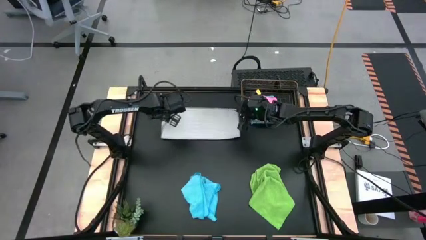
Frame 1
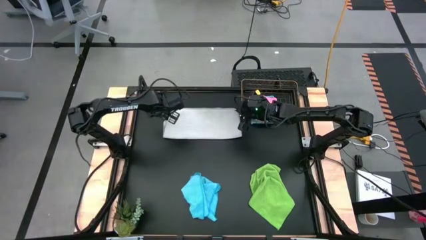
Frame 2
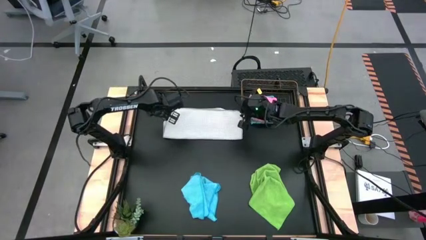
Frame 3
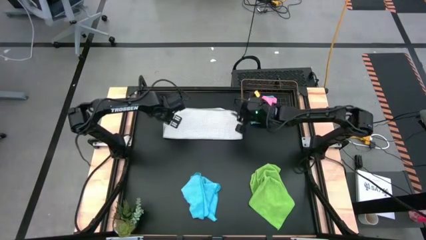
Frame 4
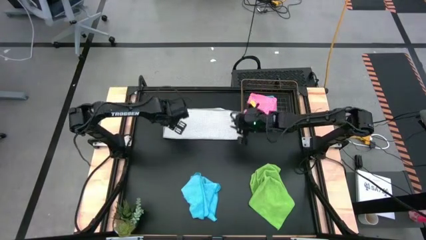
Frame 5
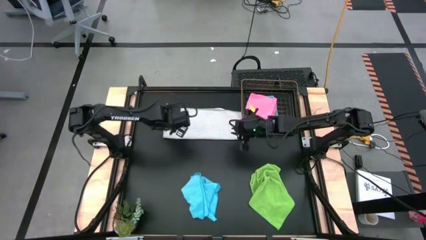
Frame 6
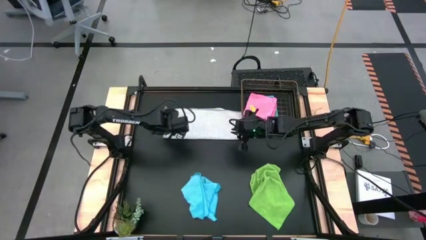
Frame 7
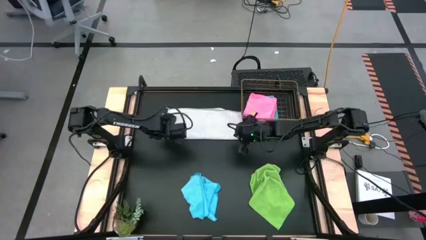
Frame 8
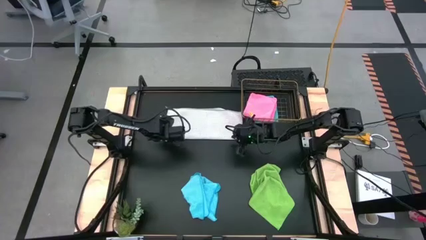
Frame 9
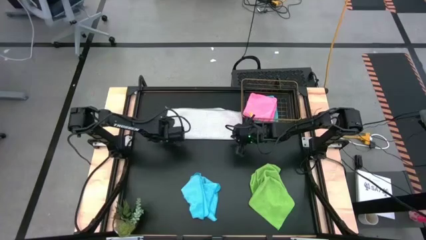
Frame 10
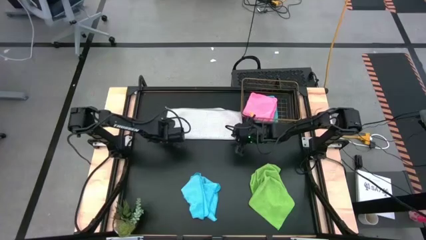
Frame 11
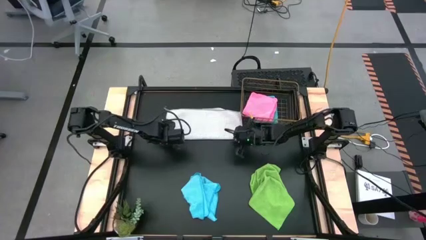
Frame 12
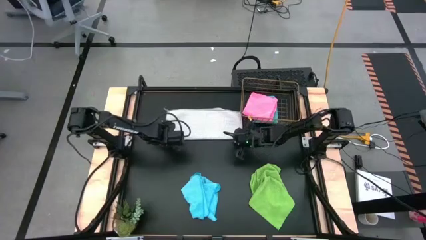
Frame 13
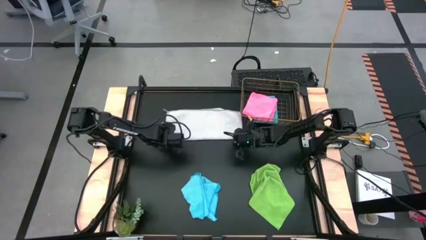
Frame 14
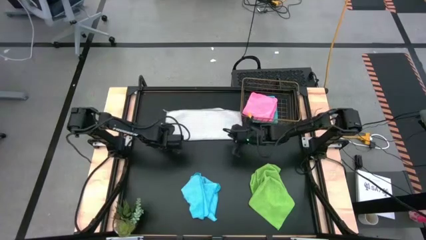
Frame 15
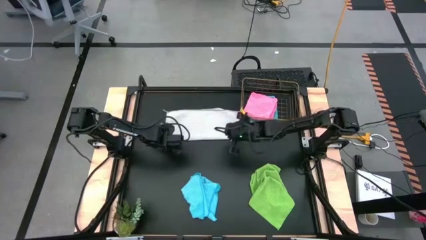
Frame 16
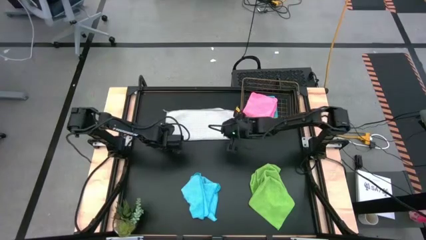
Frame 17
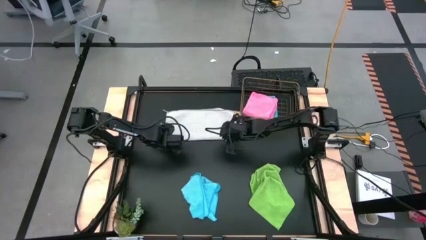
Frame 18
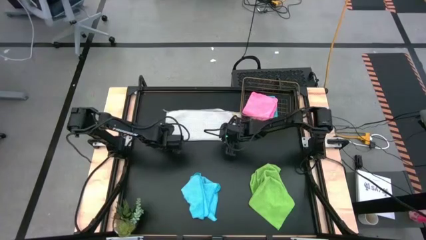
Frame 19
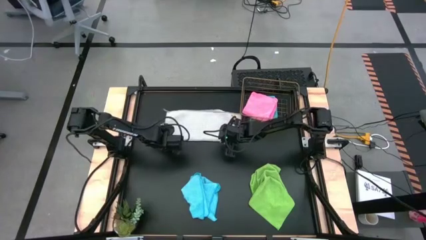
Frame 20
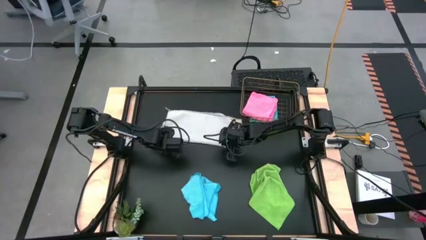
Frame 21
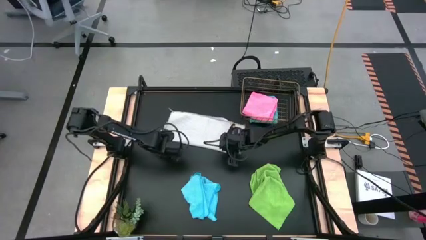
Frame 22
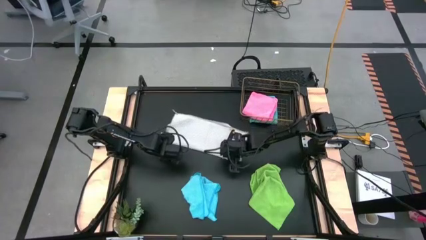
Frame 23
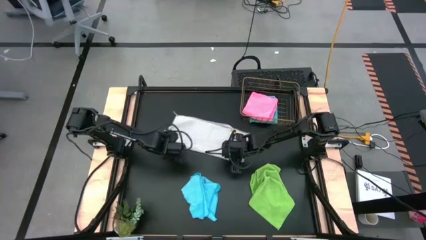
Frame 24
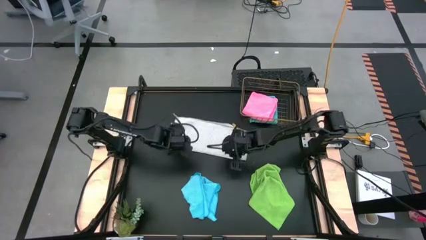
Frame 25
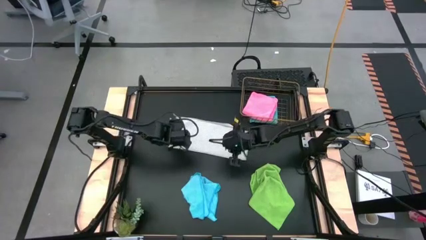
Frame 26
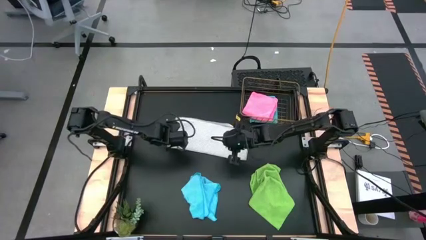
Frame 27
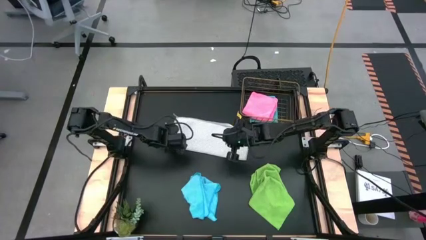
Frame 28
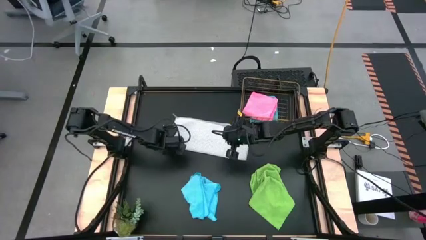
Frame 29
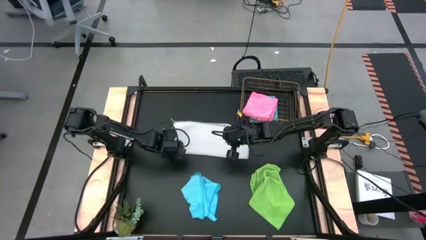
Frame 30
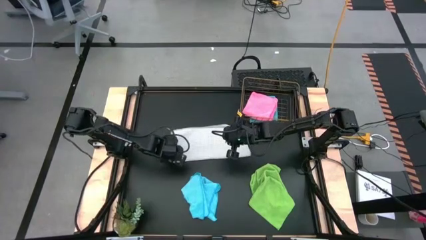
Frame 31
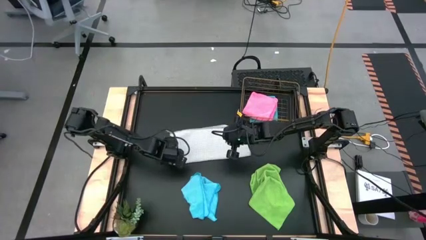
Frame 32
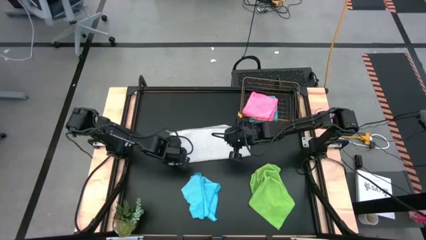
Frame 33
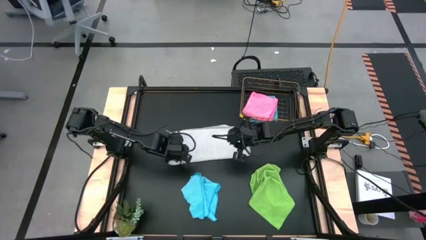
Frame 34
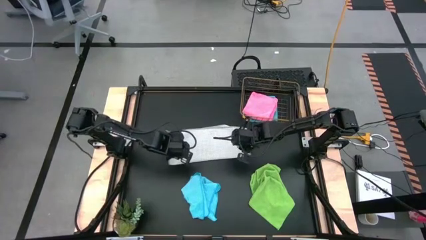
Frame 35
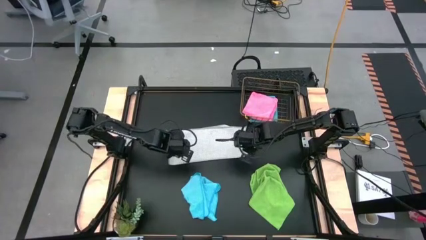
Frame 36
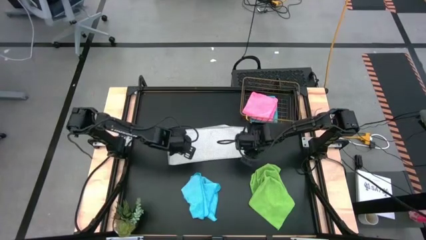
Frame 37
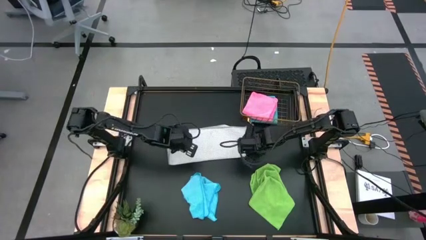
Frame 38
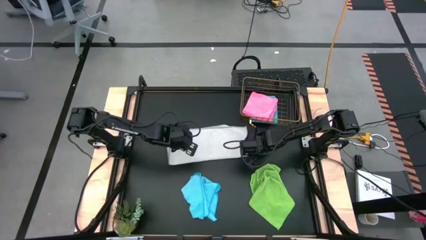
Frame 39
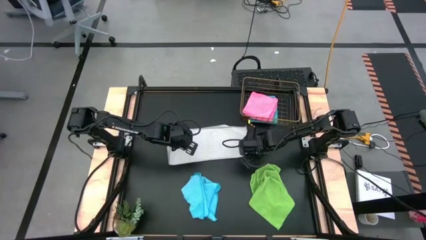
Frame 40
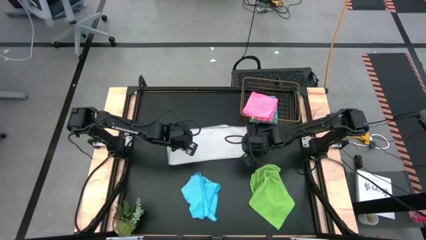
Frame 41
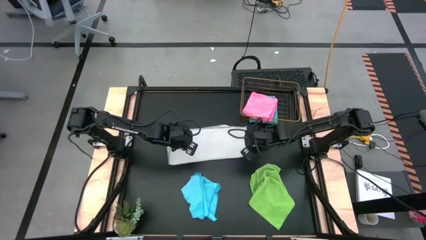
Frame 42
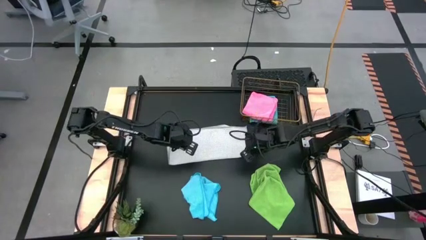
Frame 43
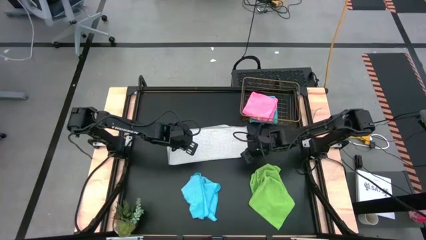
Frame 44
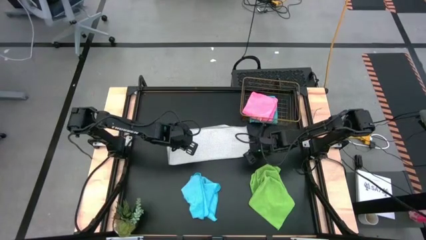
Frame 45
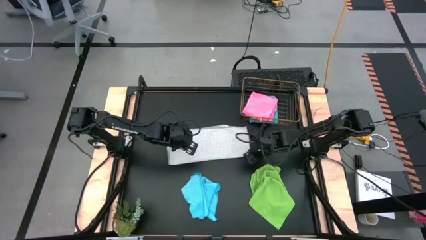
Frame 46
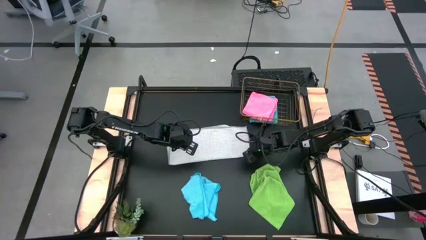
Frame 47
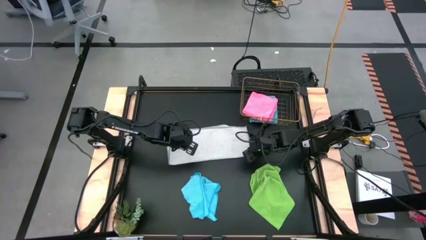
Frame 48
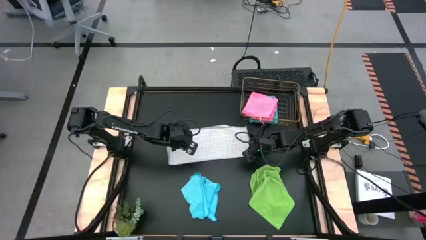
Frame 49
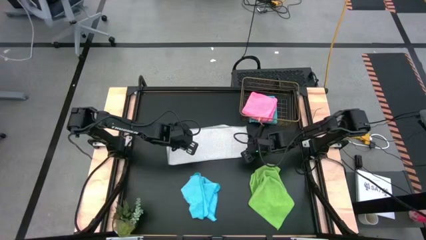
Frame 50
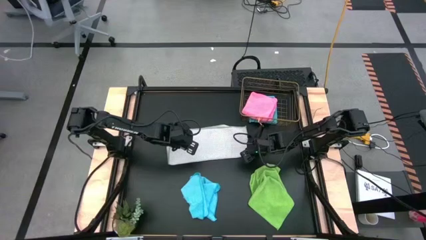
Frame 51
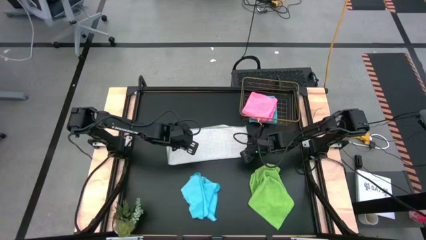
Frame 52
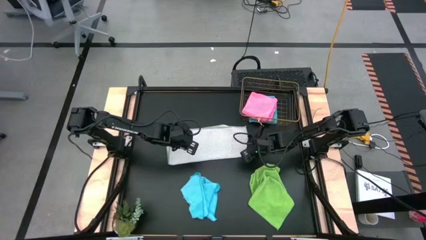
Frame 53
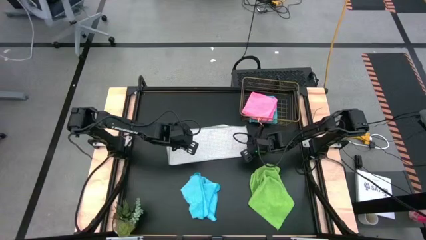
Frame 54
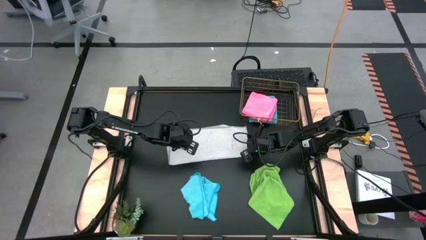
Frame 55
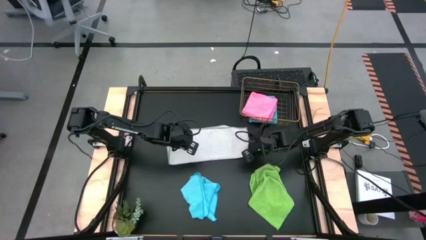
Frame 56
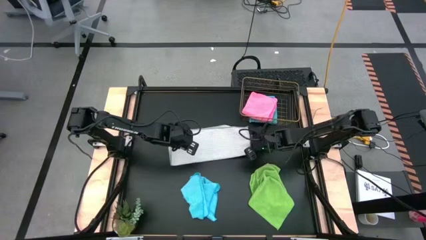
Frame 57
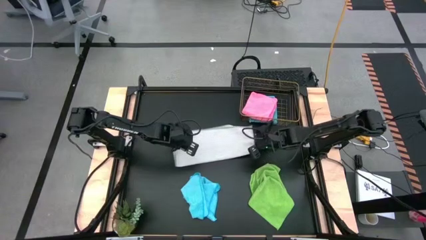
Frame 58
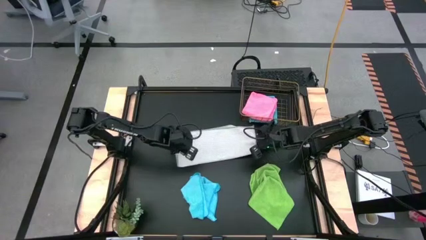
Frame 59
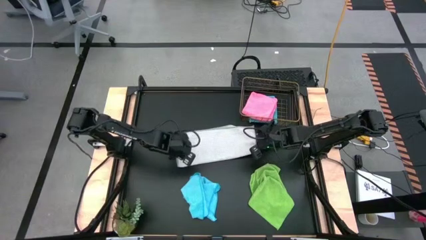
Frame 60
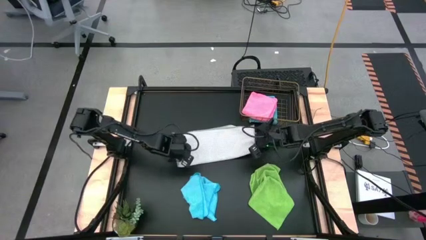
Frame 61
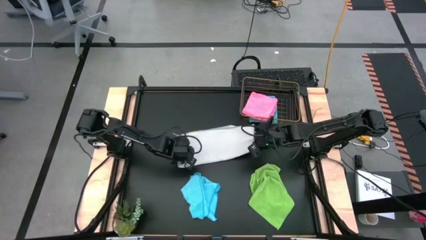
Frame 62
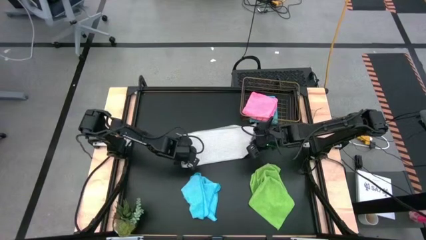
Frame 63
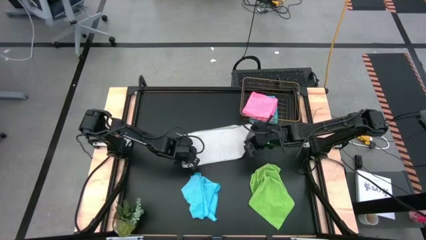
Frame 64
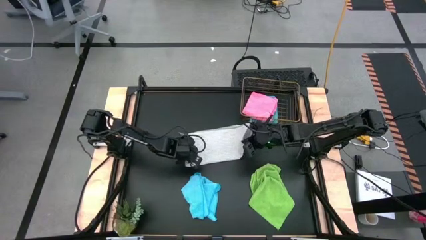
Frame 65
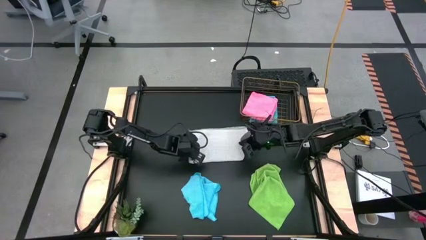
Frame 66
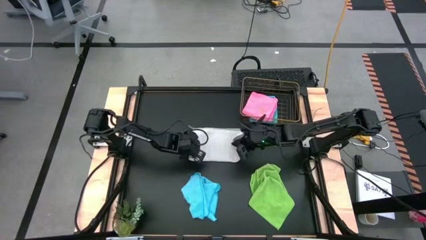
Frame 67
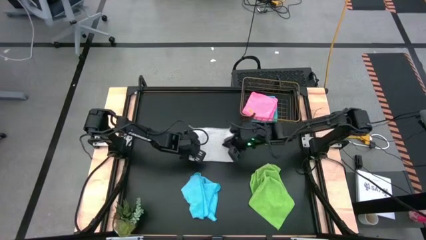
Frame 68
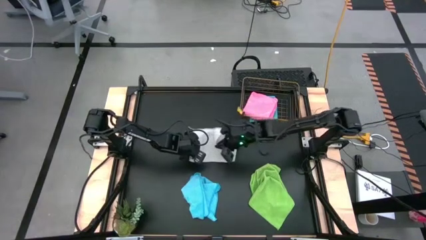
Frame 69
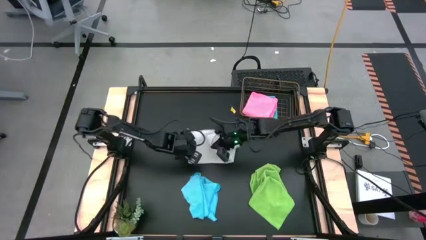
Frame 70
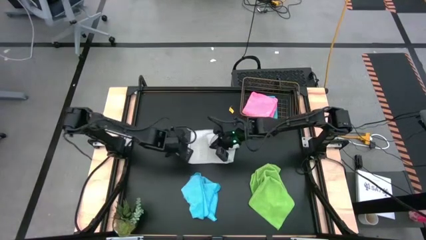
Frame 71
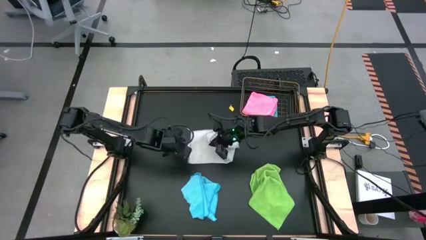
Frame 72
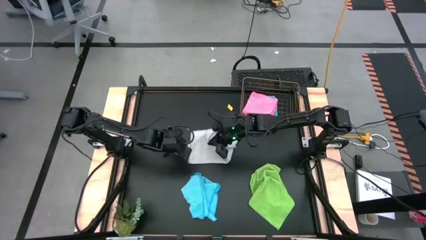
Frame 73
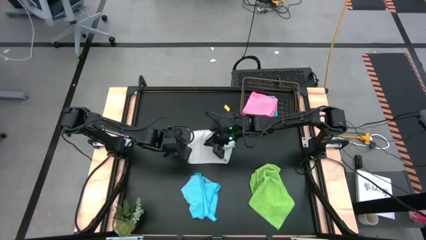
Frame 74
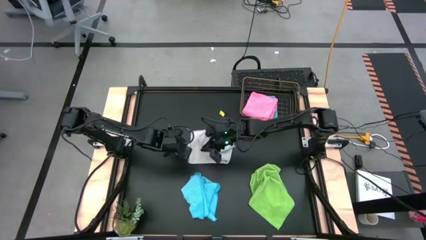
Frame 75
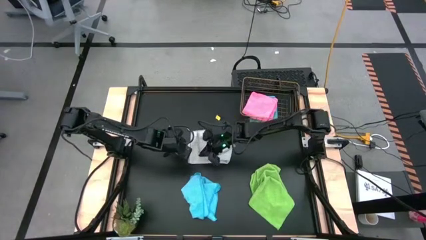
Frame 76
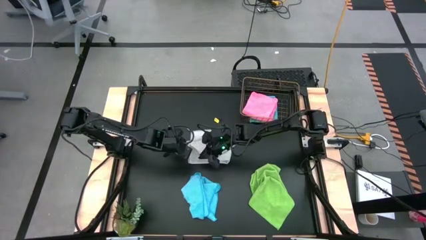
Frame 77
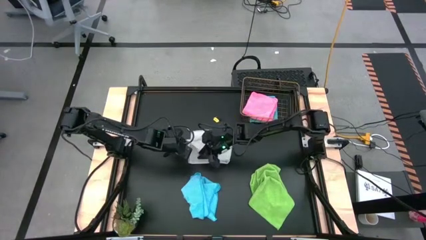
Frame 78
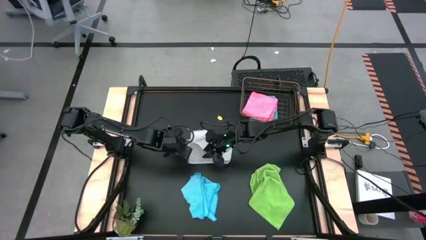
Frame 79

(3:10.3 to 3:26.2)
Task: Fold microfiber towels
Fold the gray towel

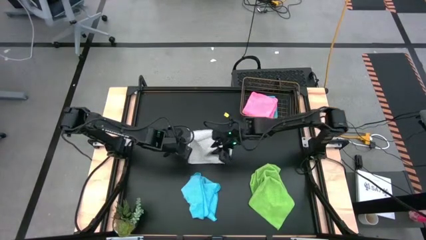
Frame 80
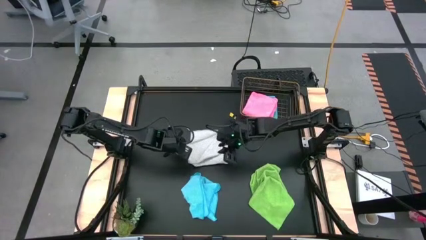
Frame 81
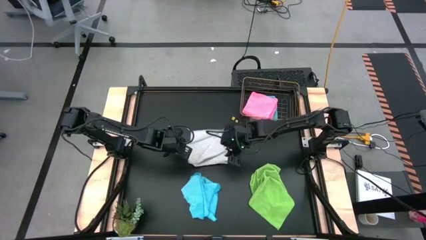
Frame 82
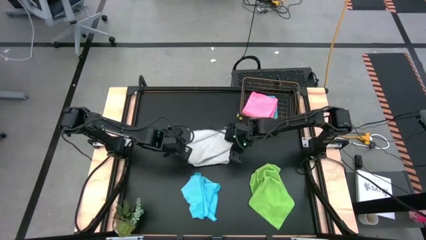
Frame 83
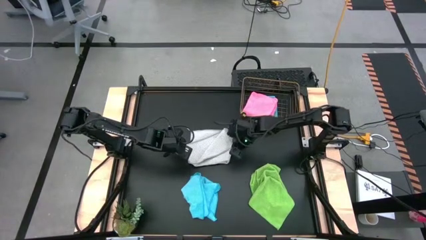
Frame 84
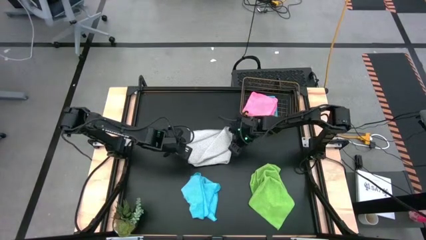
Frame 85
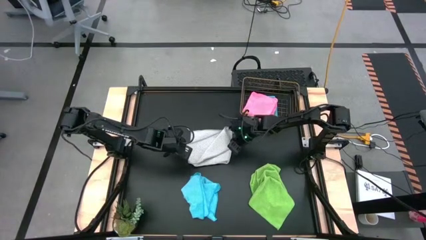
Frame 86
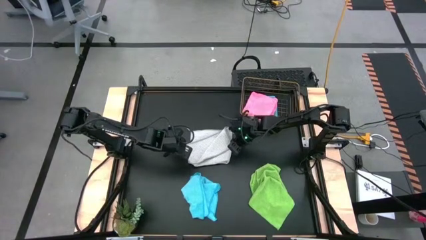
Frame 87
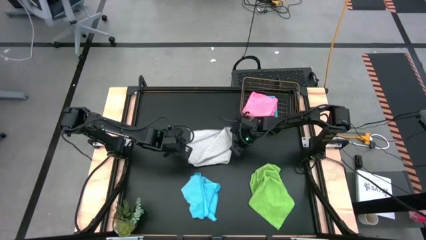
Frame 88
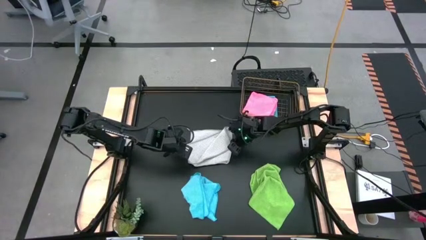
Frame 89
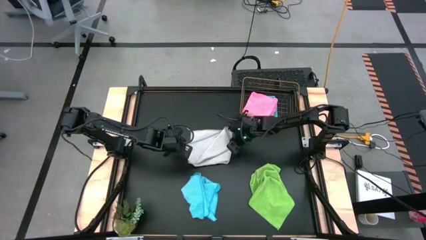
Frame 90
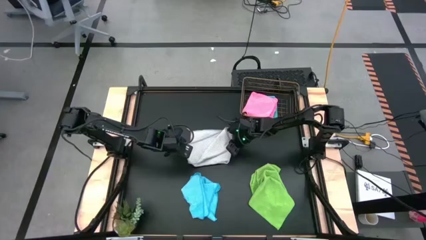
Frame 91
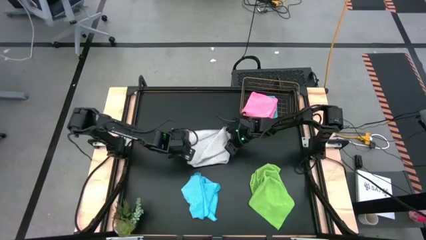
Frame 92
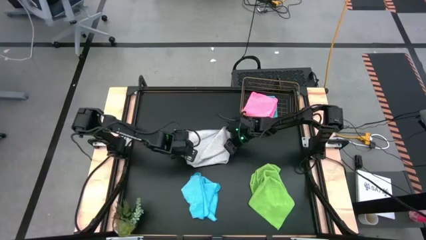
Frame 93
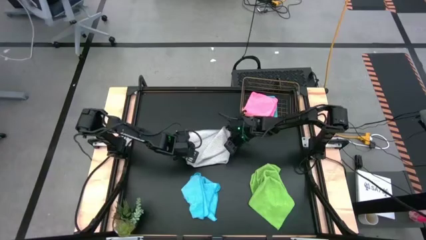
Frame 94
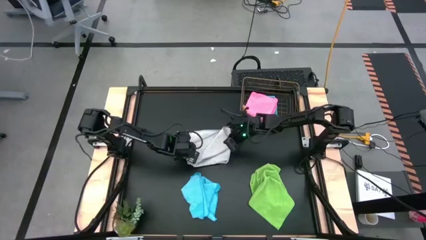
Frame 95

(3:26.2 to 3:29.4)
Fold the gray towel
